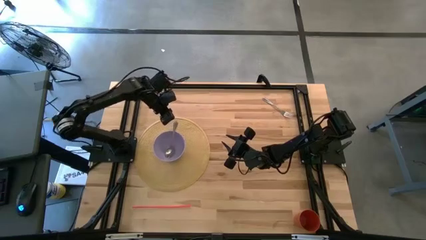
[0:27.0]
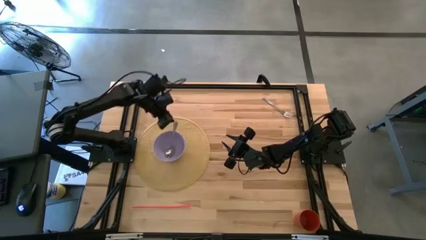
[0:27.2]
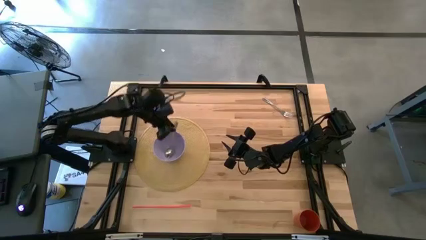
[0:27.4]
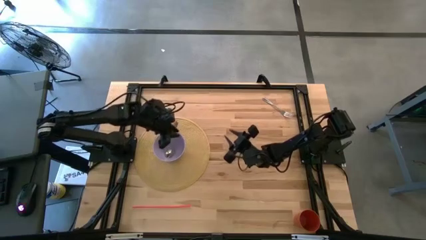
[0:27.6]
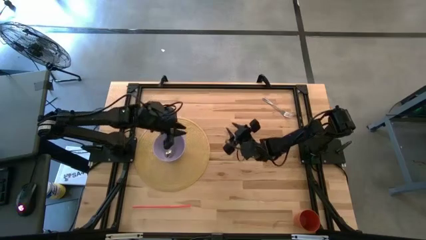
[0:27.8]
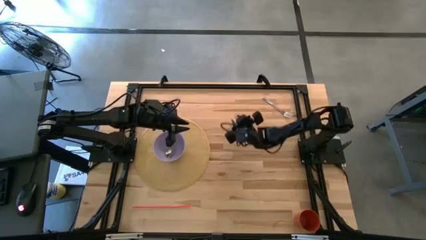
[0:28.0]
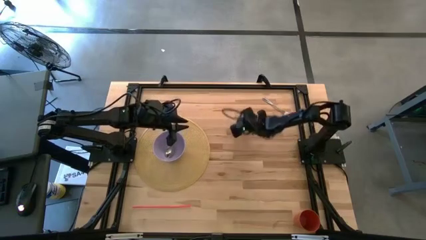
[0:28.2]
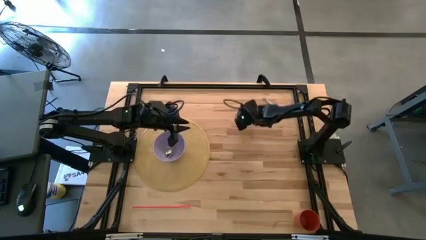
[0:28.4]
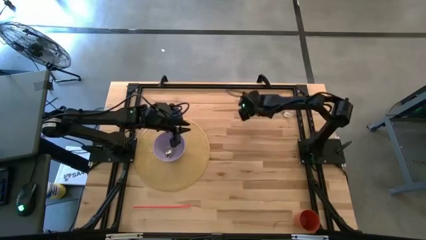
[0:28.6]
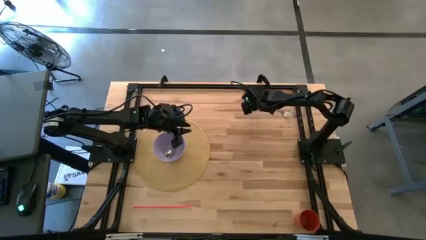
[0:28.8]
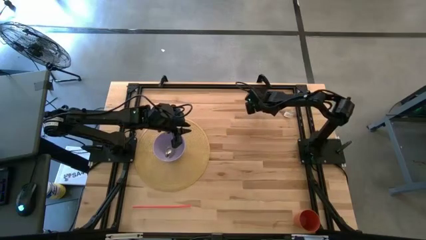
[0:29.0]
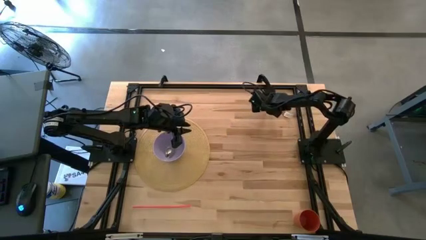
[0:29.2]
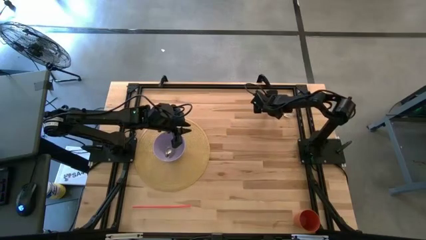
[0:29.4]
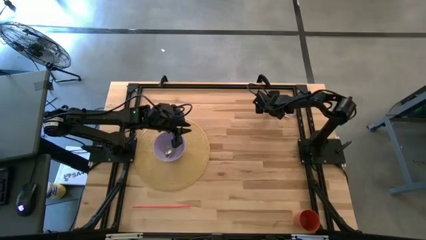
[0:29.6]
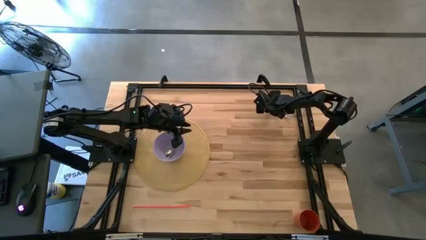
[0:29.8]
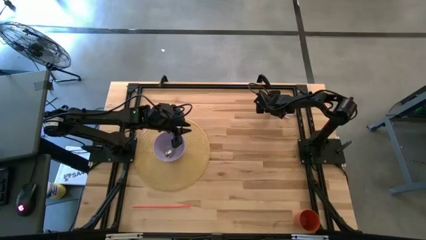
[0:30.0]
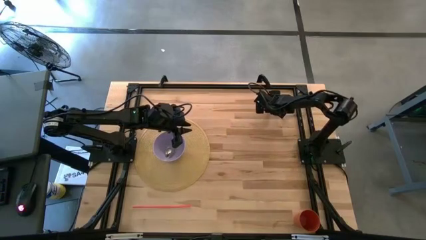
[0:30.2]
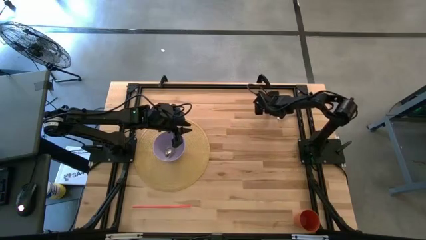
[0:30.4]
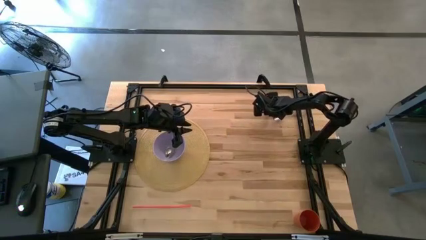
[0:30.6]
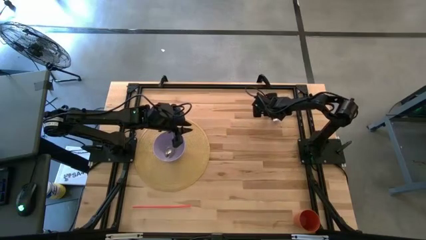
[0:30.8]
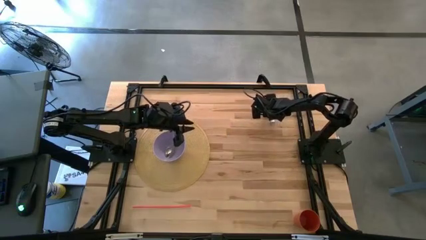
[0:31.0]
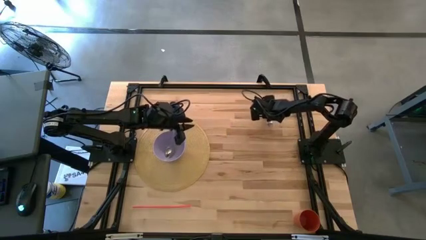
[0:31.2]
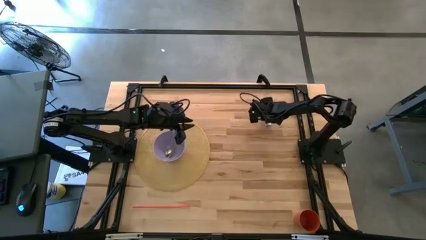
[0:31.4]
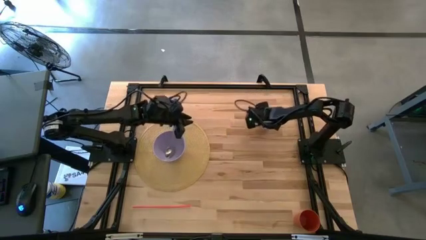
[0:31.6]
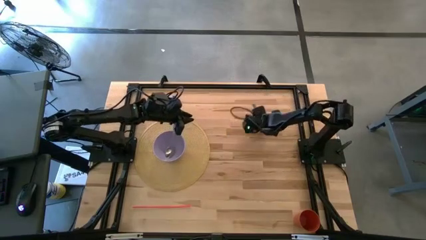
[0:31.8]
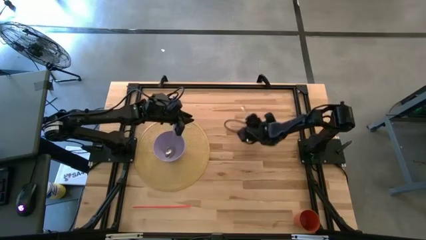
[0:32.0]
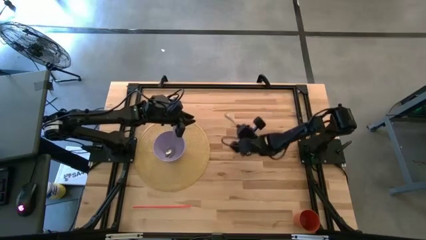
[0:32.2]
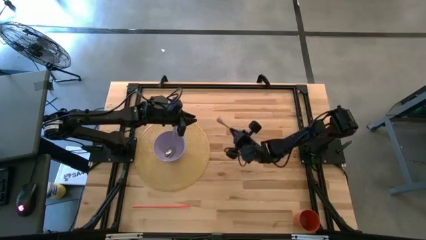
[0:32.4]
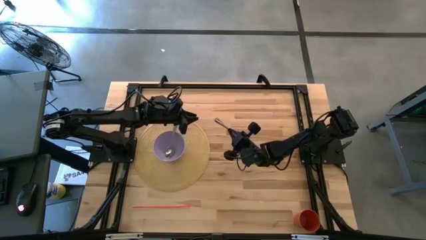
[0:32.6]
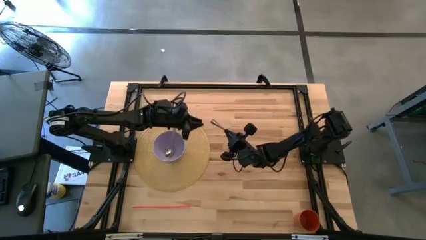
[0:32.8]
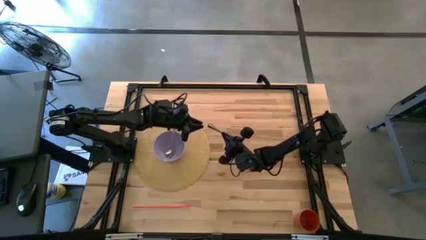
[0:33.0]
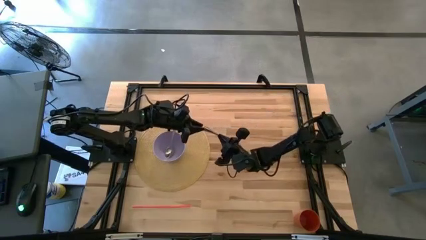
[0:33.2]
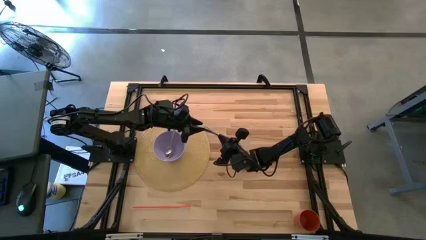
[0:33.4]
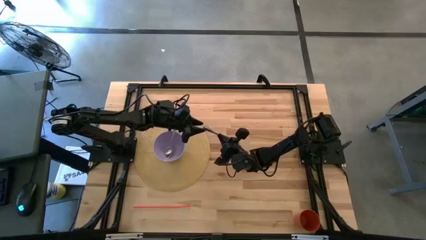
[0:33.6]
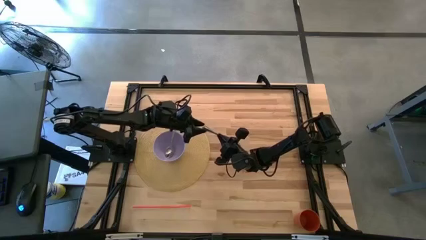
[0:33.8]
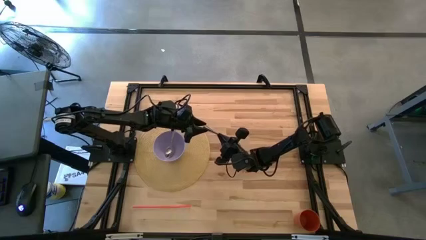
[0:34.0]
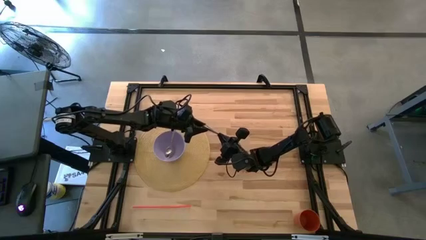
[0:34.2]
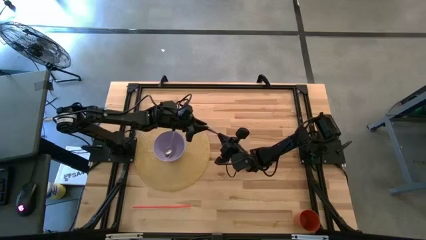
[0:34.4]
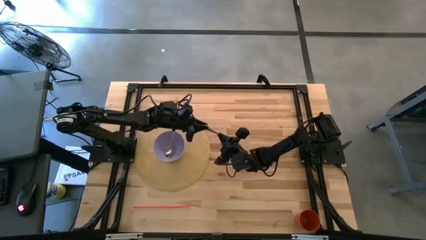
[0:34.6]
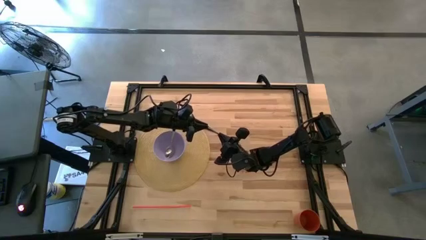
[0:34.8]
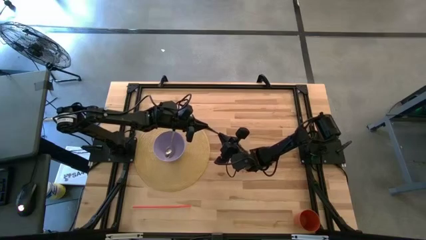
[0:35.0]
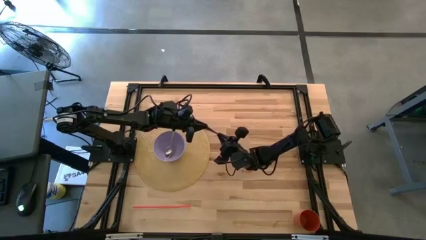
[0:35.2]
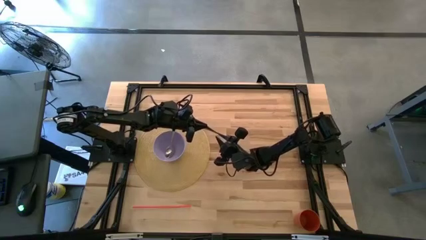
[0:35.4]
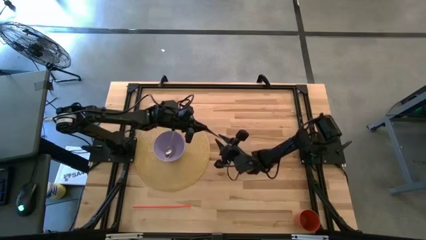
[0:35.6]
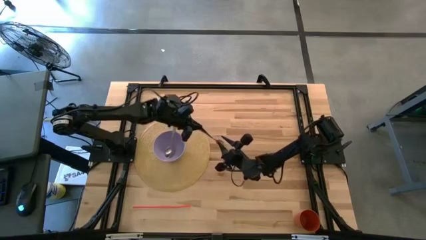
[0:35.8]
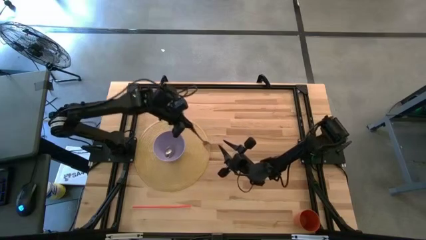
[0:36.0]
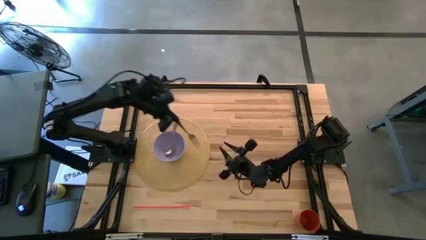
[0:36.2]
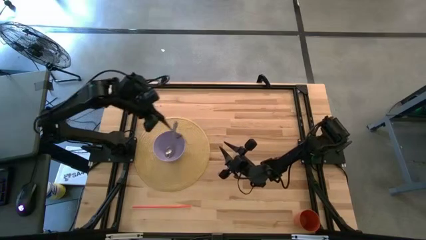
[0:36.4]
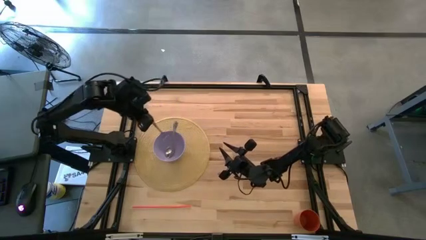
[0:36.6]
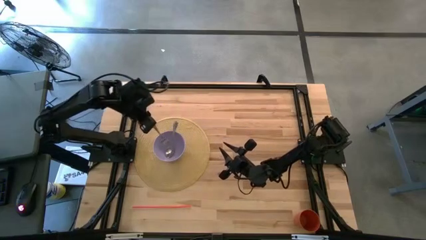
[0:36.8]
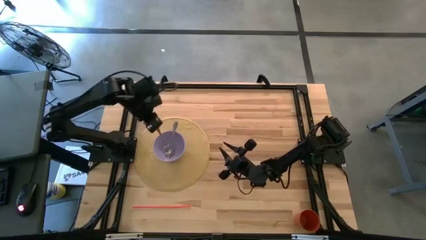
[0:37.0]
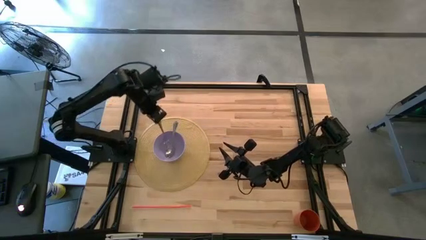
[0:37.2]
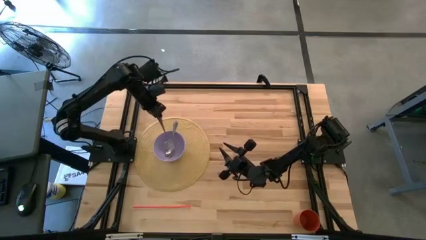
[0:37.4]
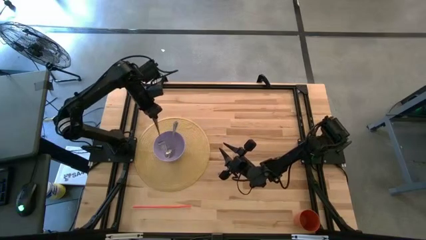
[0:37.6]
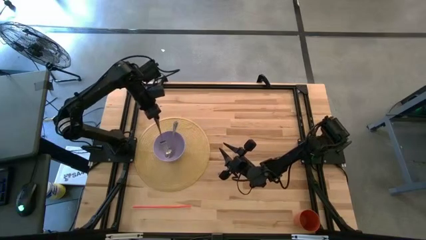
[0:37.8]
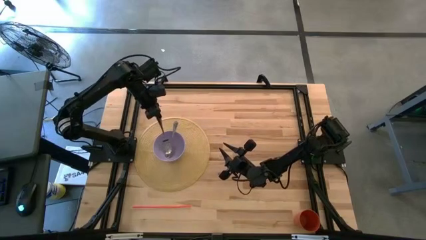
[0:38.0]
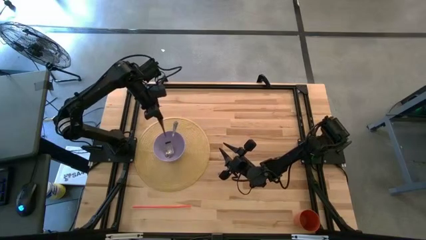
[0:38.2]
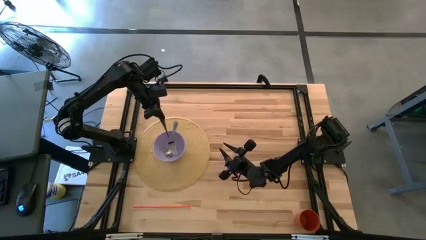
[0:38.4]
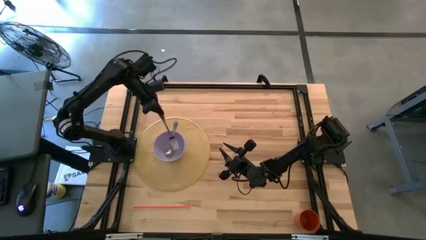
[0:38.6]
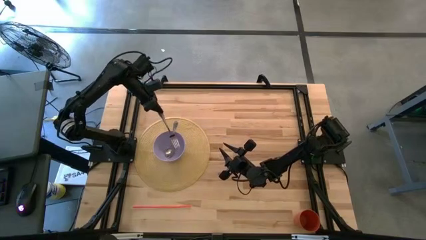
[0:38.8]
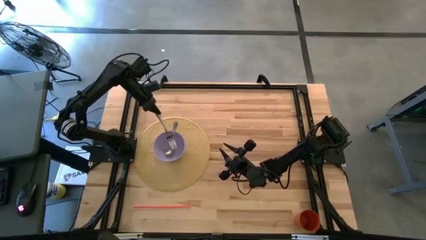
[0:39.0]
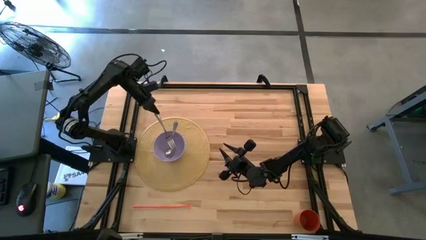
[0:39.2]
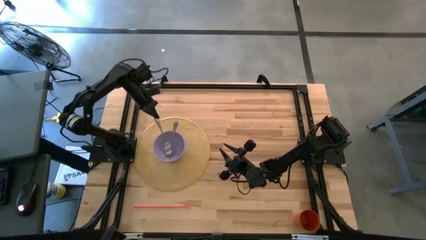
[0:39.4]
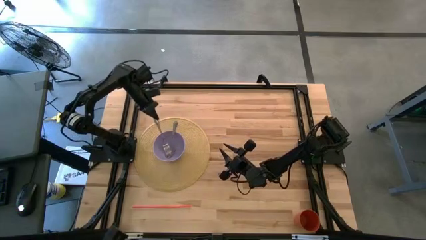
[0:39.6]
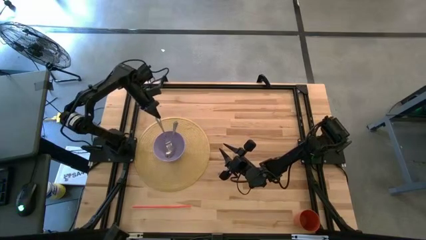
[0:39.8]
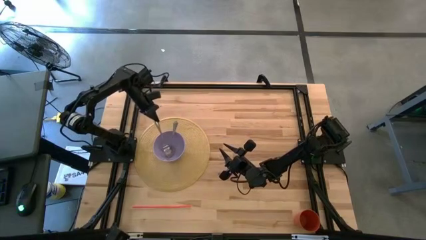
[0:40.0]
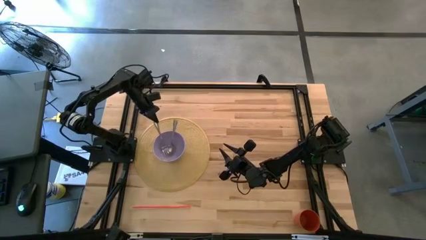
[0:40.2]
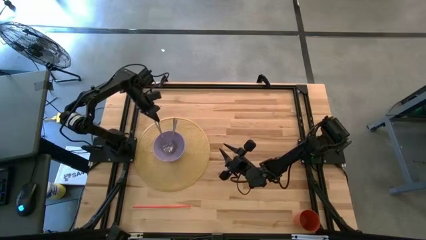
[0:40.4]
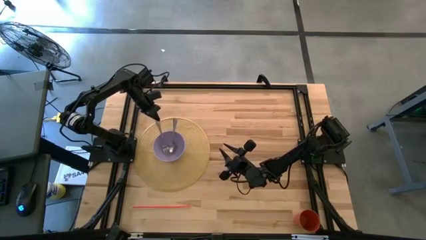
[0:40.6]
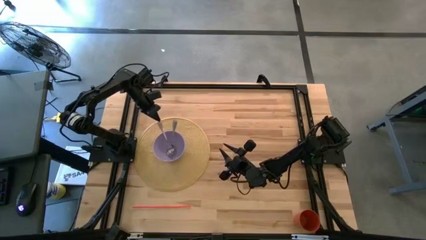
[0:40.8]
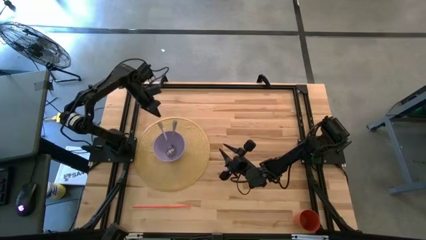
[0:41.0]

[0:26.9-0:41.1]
Task: Pick & Place Utensil
Put the silver fork into the purple bowl

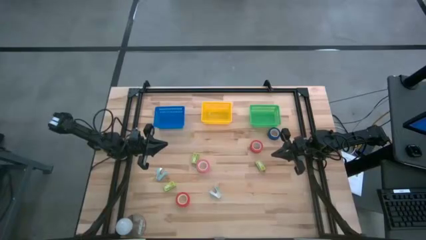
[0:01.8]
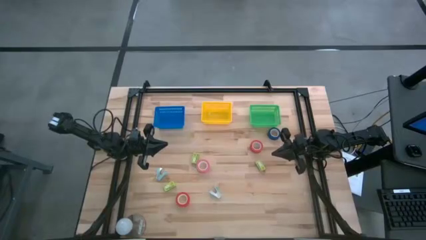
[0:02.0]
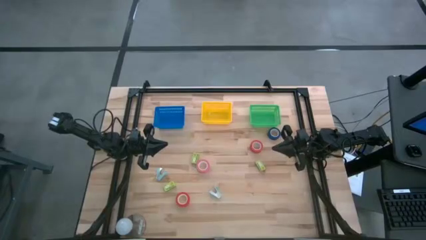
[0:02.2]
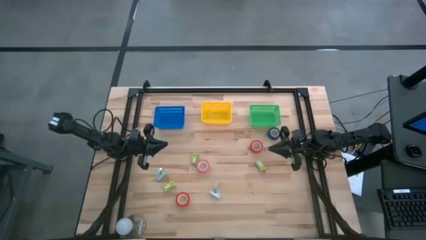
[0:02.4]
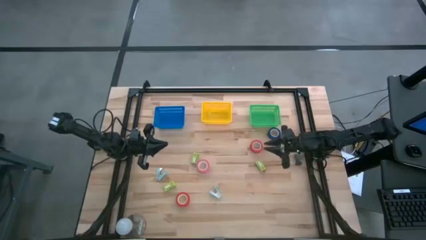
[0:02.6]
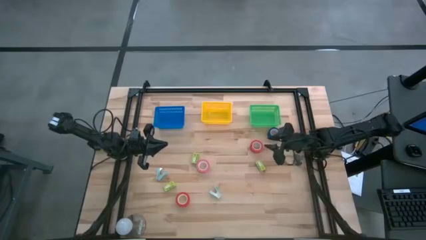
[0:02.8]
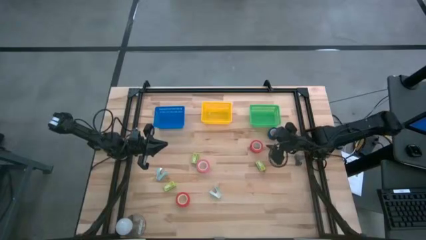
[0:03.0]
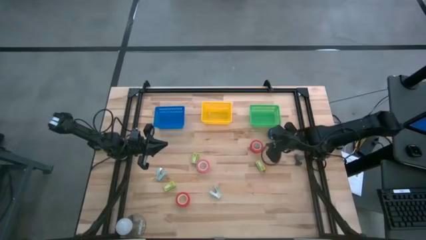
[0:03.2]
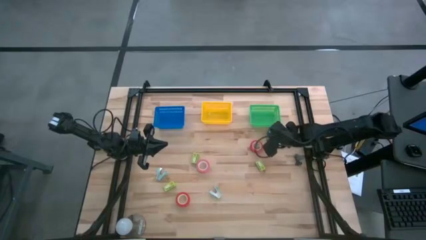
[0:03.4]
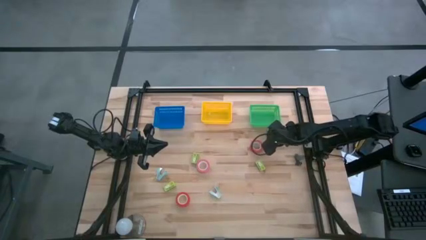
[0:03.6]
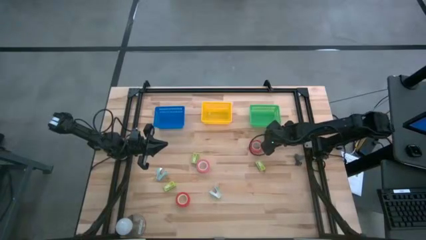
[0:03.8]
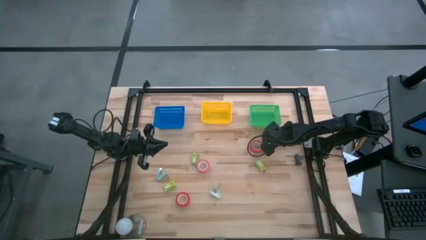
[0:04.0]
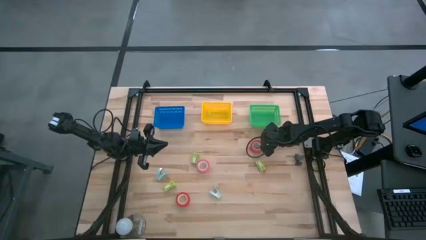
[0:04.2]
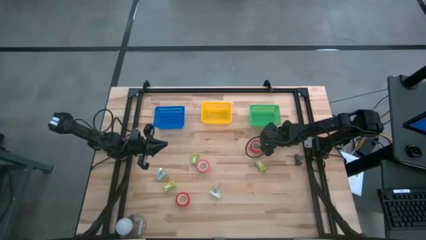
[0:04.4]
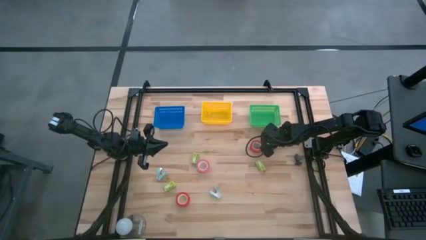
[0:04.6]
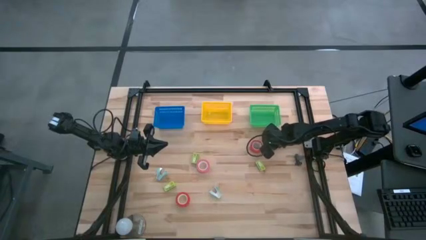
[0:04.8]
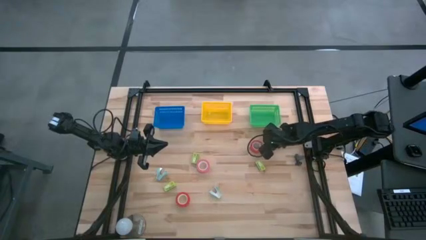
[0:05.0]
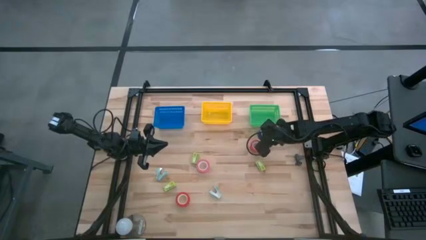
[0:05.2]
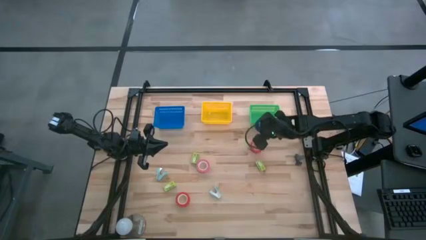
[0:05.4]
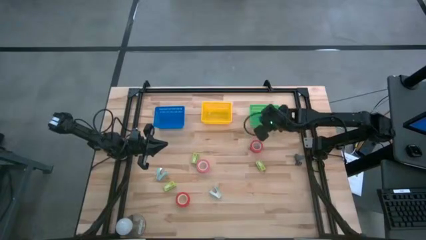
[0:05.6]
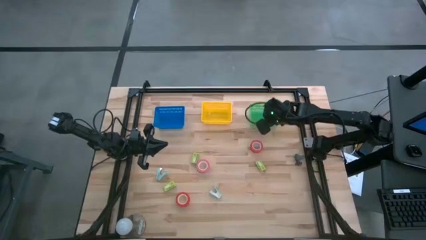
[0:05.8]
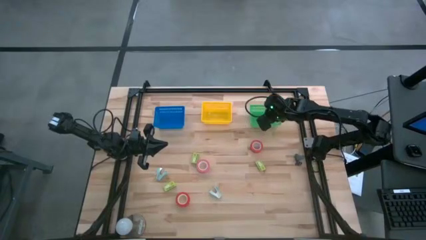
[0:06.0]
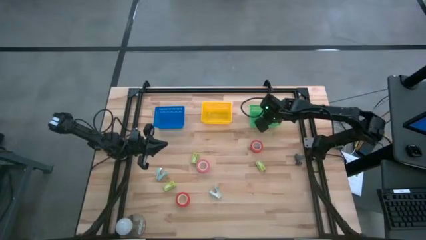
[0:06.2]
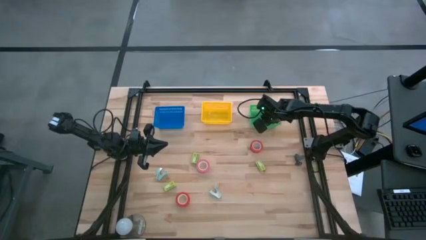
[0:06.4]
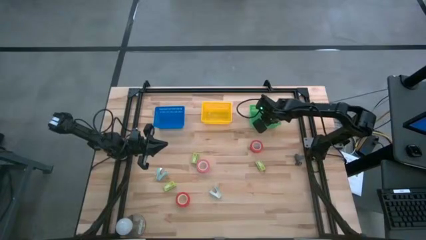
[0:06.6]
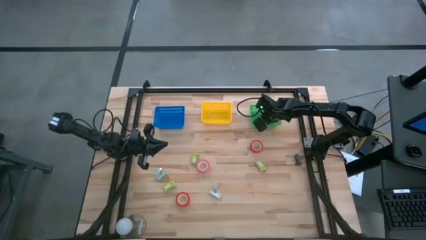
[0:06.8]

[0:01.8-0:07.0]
Task: Pick and place Stapler, Stapler remover, tape
Put the blue tape into the green basket
